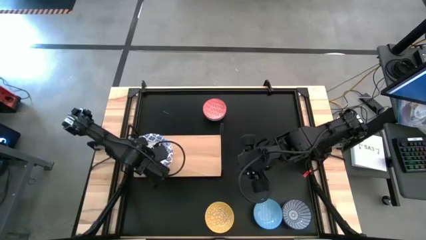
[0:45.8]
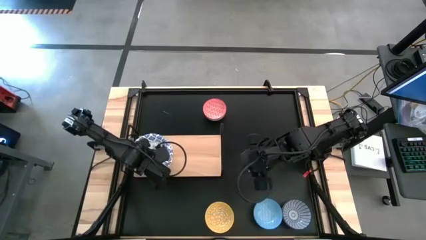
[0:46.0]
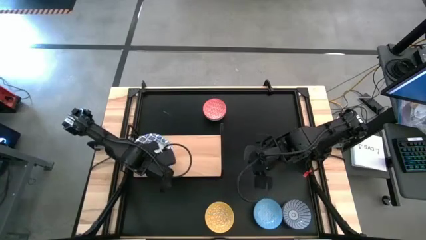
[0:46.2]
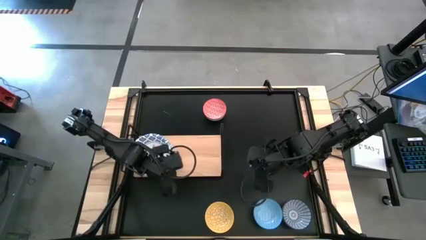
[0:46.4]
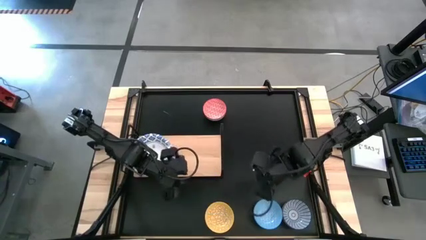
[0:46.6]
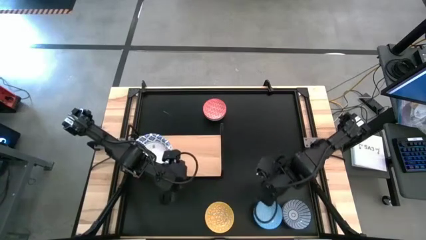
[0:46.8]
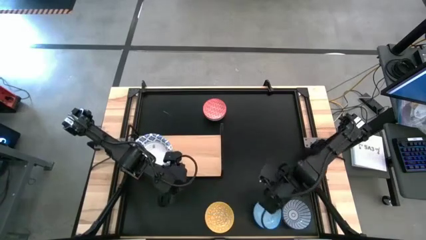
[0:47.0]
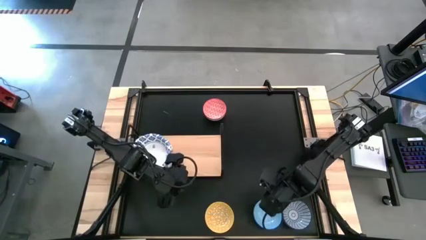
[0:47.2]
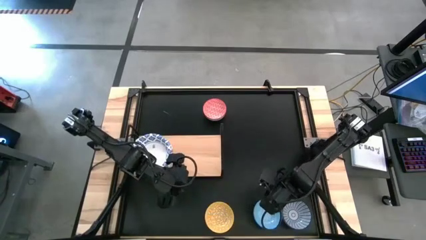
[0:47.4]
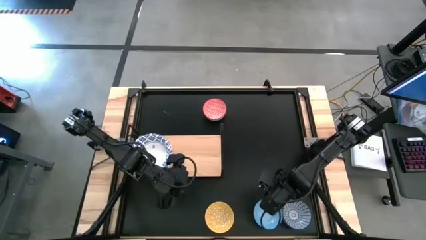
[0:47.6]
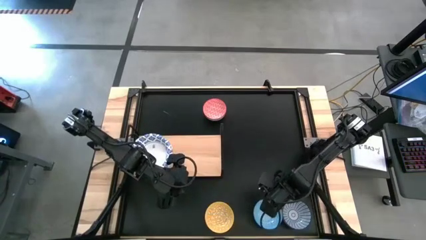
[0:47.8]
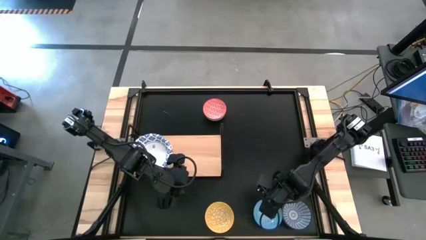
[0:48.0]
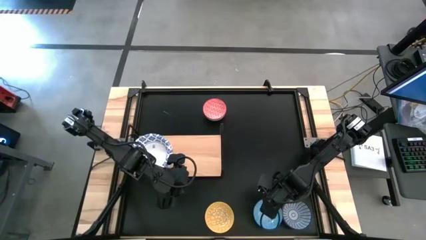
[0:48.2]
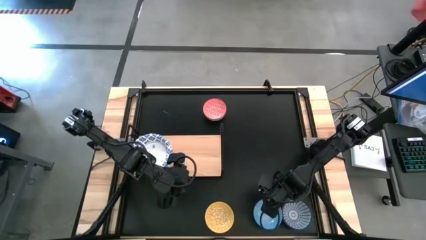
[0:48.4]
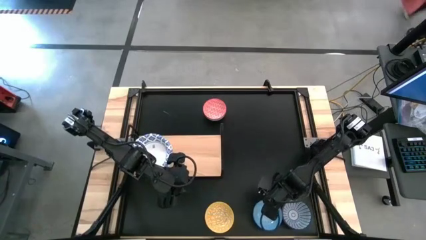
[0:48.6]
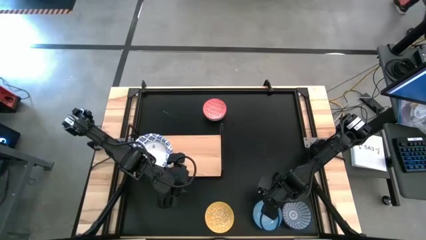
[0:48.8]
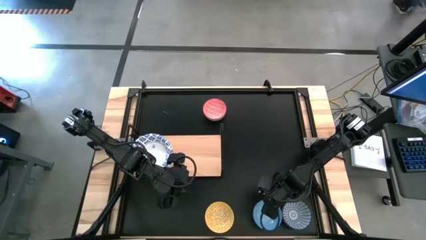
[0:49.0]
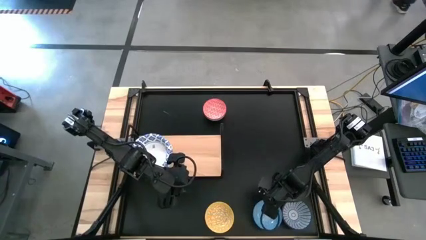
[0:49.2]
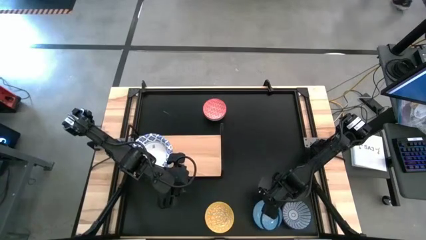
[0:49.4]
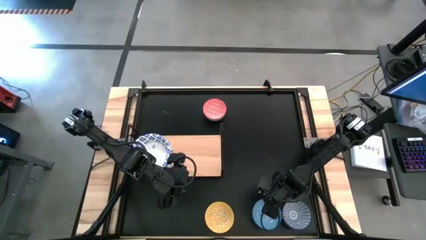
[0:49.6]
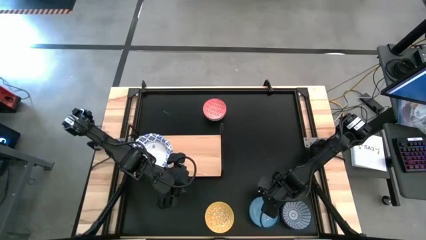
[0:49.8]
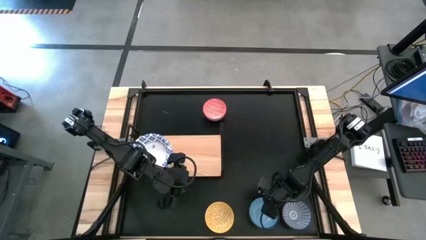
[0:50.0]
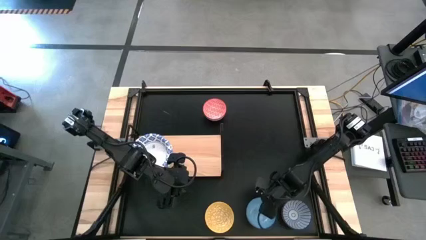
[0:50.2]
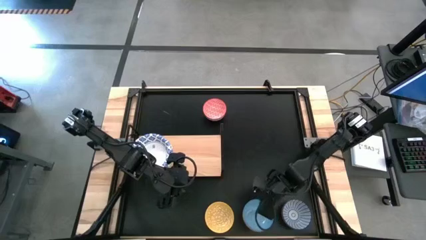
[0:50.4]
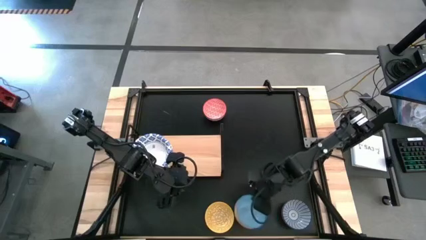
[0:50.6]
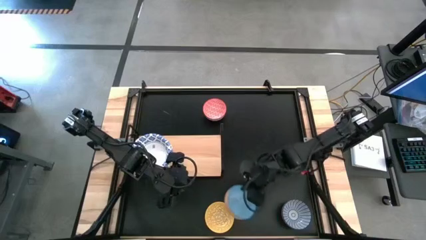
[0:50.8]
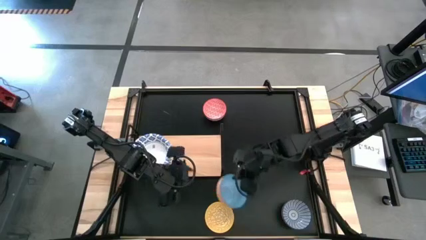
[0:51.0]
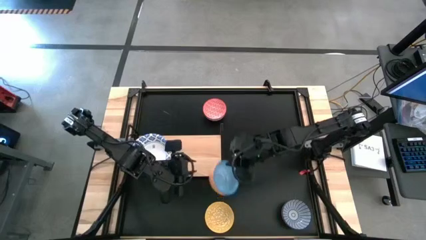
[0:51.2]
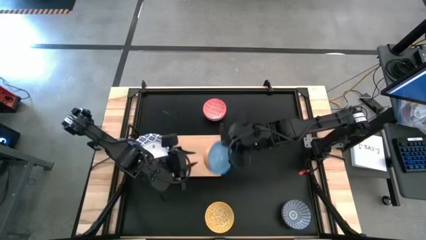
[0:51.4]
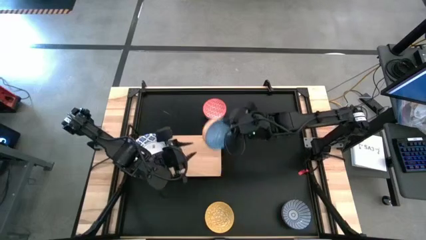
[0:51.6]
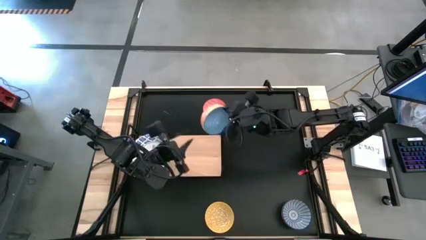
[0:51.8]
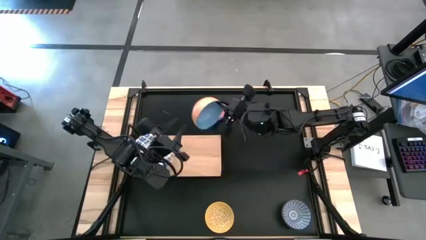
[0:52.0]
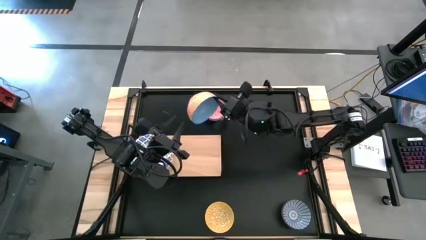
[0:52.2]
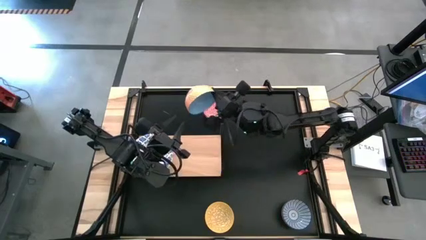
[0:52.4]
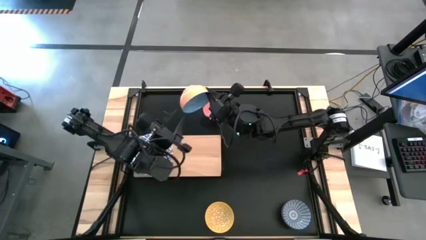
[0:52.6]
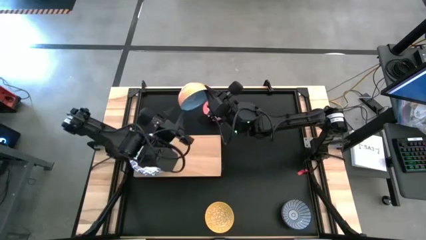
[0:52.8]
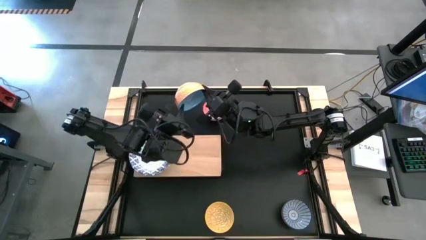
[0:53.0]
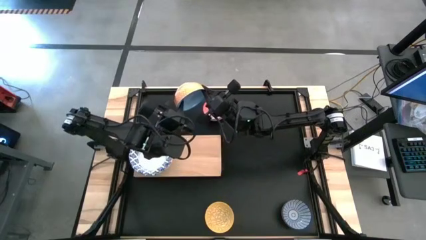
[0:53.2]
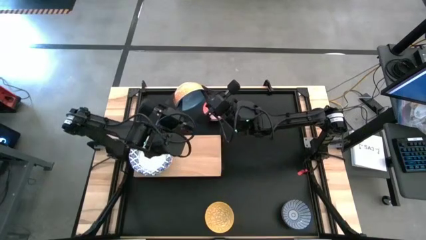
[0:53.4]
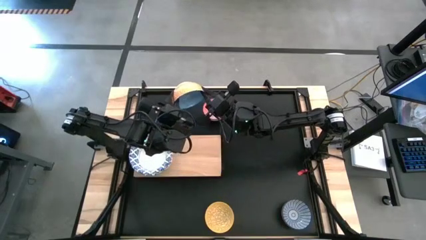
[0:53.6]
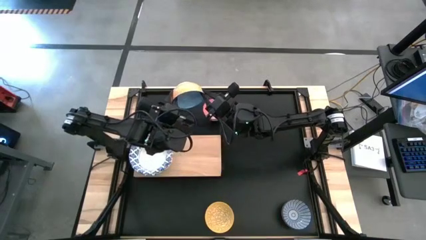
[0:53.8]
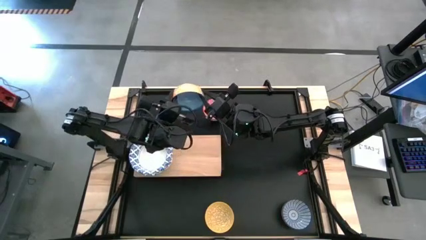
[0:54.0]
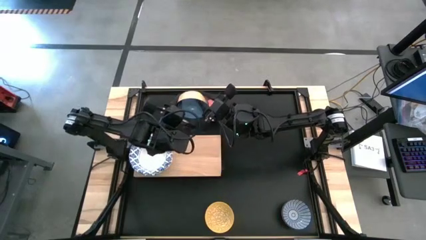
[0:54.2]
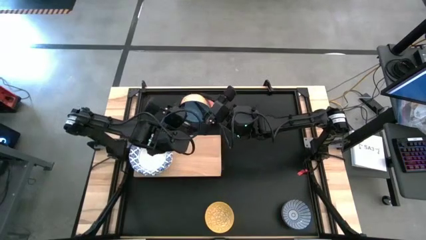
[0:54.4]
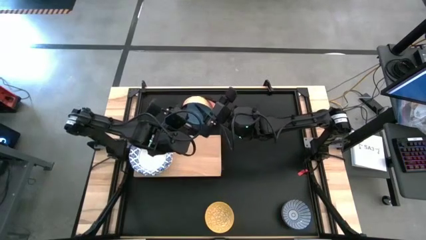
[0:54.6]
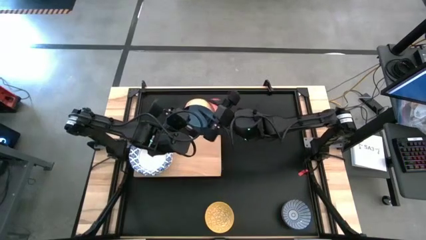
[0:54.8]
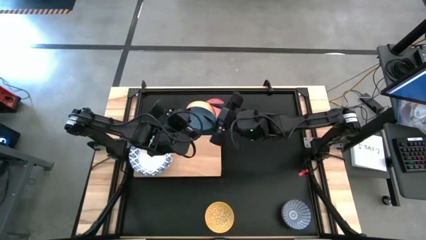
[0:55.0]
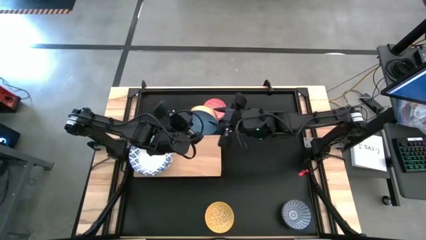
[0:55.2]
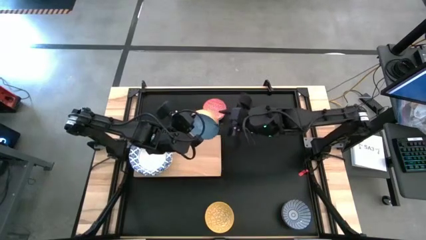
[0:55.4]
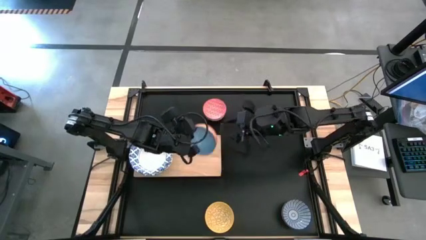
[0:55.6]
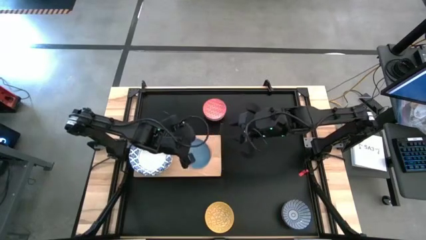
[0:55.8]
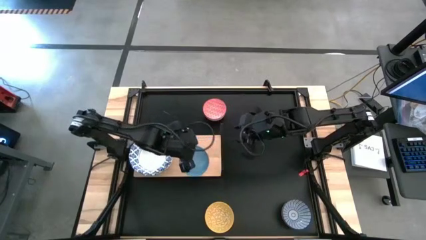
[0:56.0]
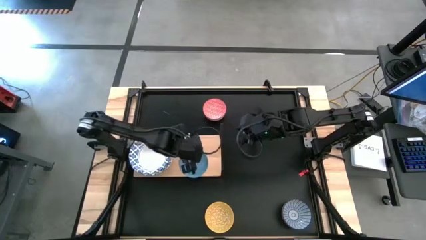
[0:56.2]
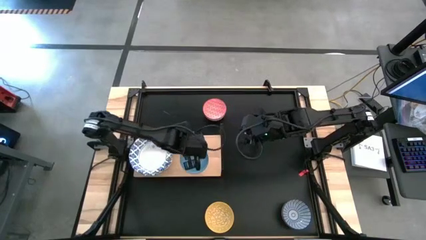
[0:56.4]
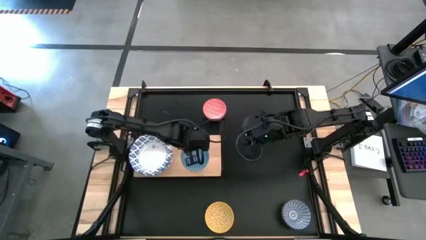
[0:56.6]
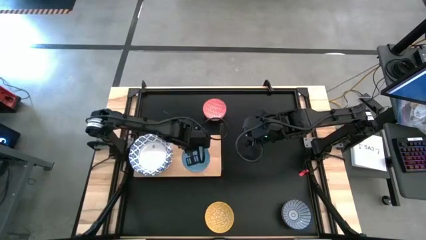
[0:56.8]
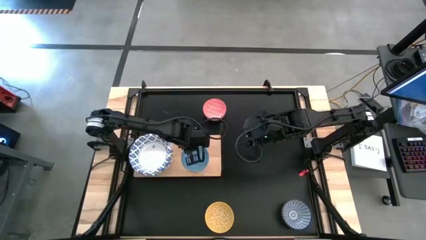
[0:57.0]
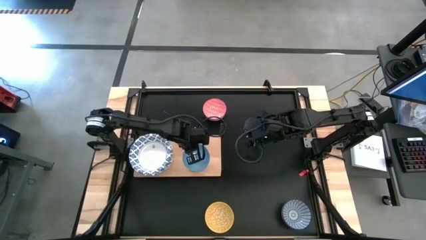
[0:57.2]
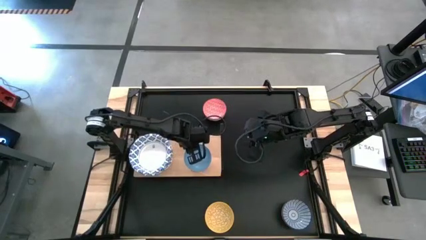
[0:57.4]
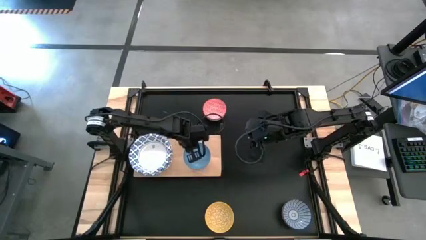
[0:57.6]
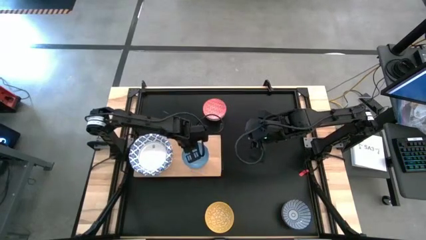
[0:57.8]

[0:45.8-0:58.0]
Task: Place and stack bowls onto a shelf
Put the light blue bowl on the shelf

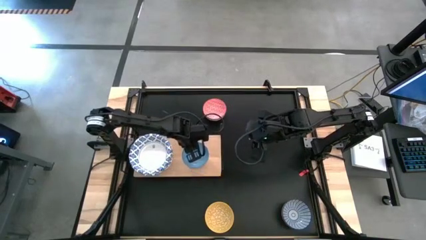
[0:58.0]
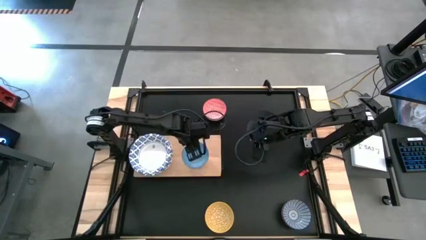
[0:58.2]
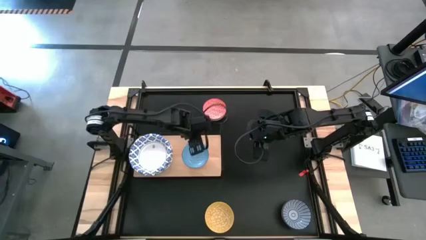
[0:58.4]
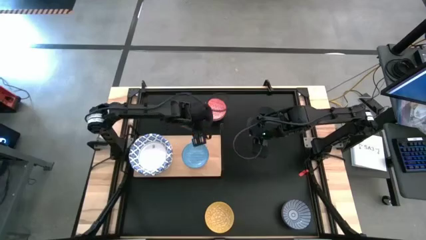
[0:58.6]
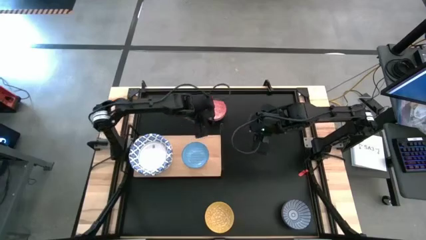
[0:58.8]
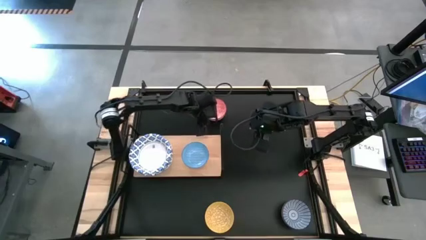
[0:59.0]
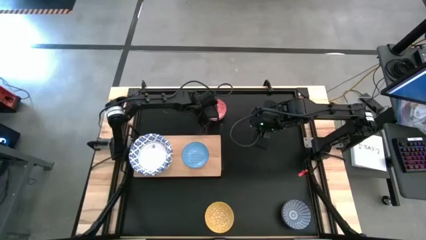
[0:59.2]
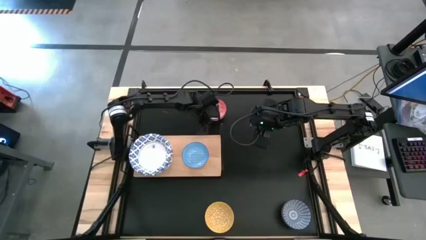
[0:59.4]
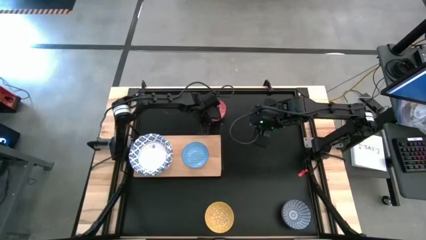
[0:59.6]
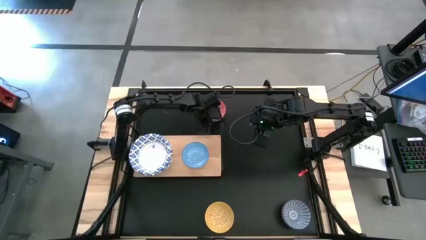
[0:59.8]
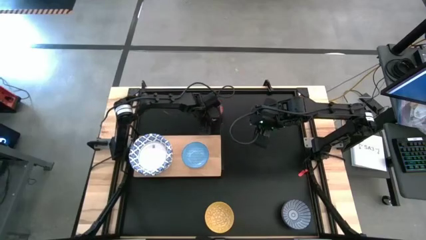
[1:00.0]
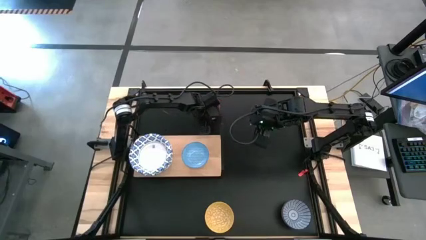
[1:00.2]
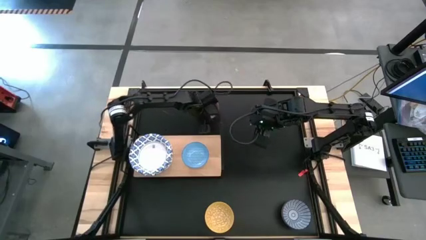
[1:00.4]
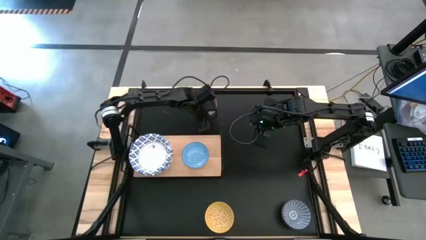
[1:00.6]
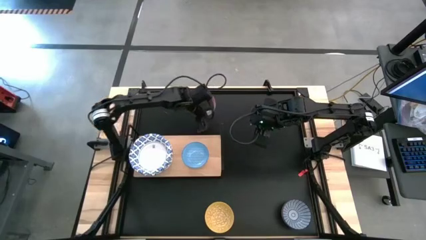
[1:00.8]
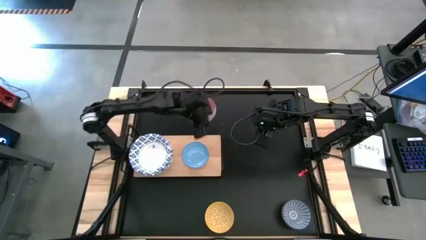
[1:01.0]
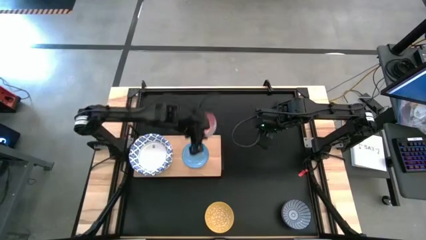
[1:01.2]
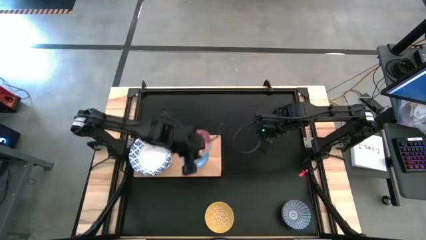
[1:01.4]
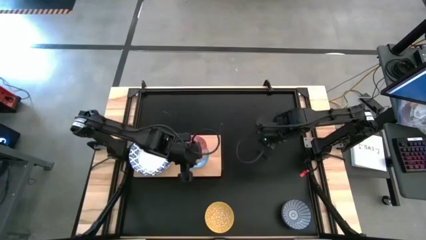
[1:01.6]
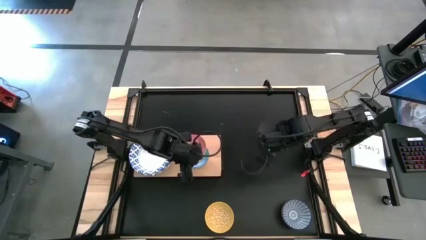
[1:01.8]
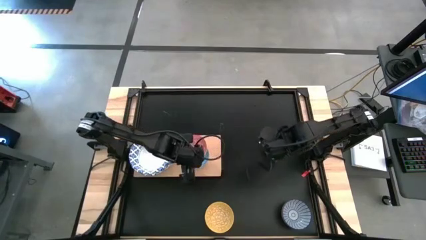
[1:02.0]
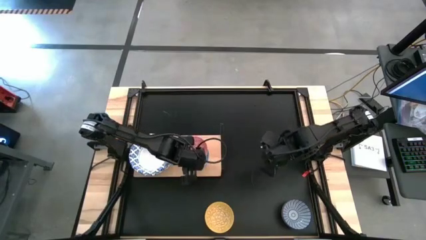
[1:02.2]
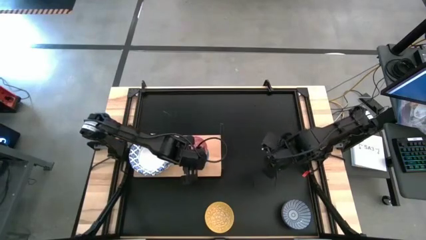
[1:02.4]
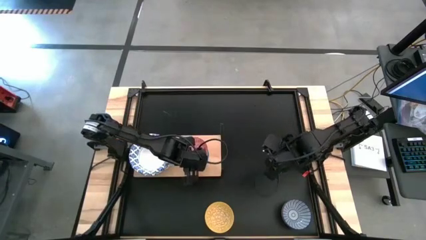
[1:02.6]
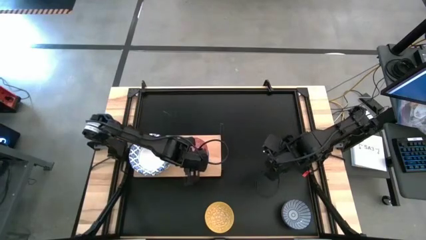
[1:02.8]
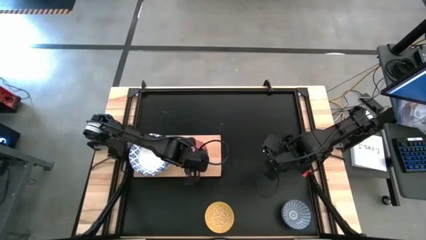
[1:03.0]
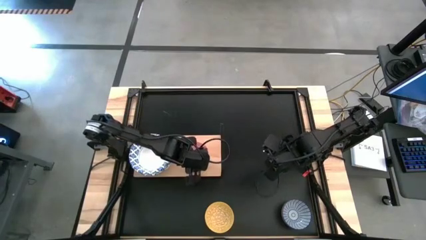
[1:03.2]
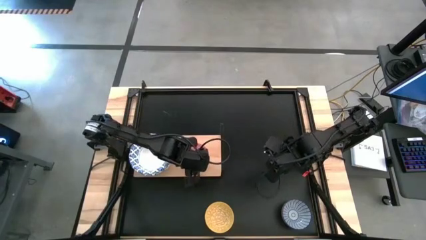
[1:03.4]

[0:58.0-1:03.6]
Stack the red bowl on top of the light blue bowl on the shelf
